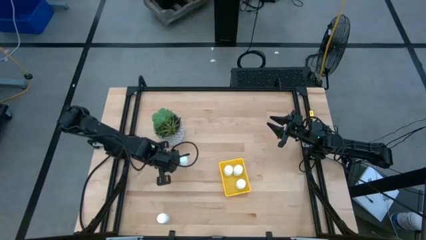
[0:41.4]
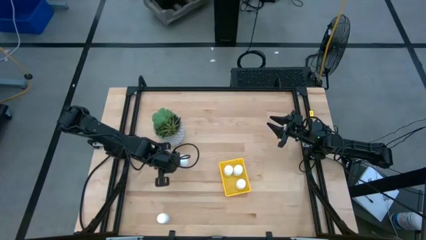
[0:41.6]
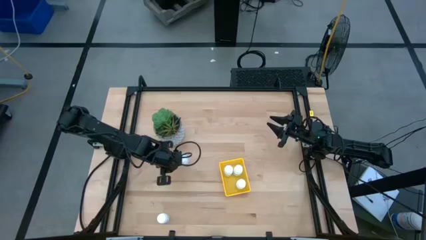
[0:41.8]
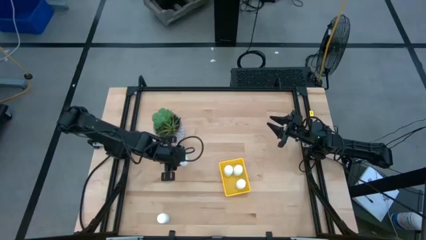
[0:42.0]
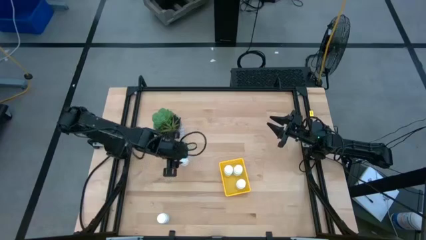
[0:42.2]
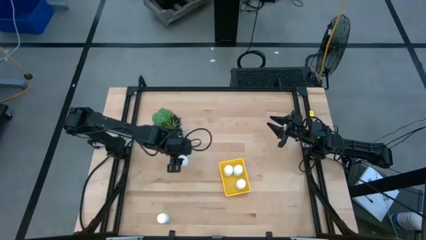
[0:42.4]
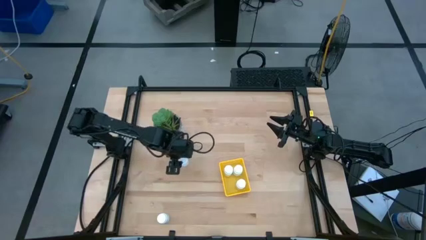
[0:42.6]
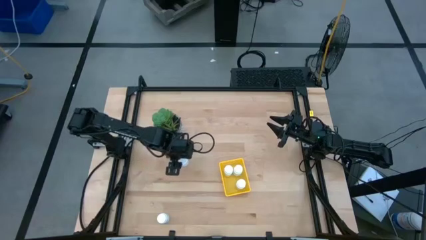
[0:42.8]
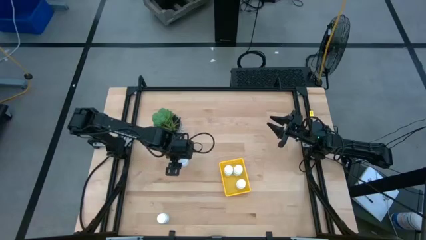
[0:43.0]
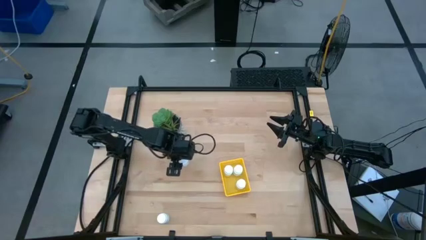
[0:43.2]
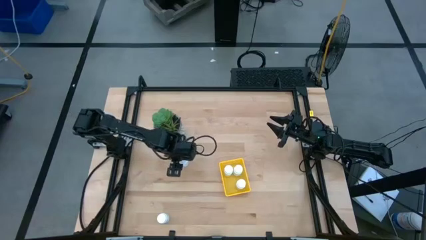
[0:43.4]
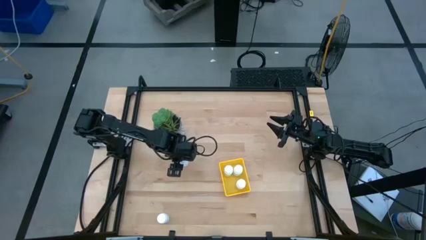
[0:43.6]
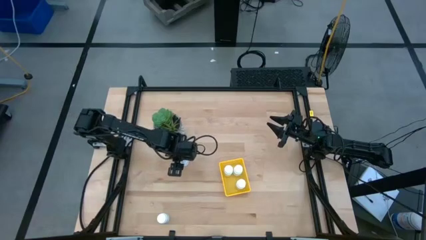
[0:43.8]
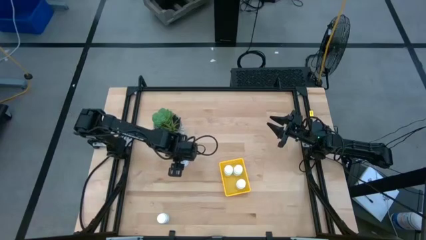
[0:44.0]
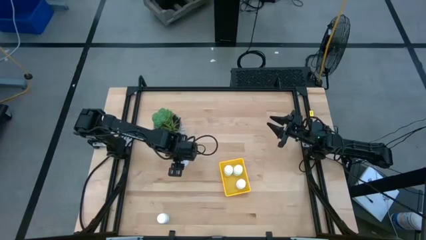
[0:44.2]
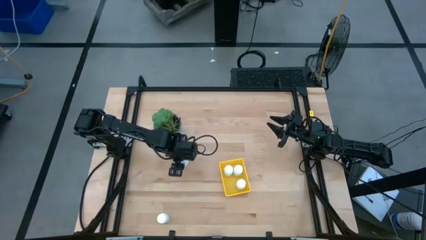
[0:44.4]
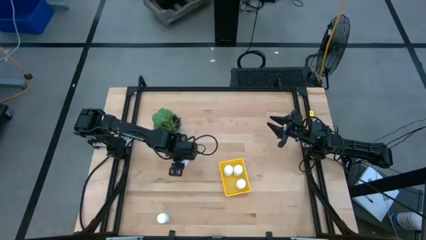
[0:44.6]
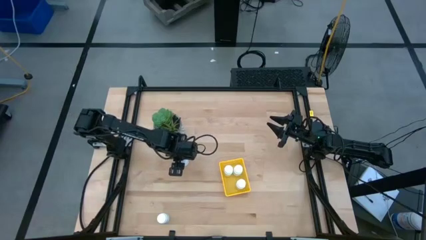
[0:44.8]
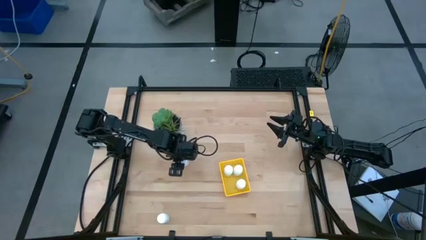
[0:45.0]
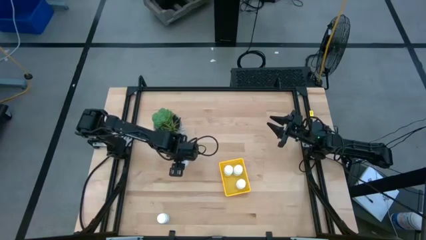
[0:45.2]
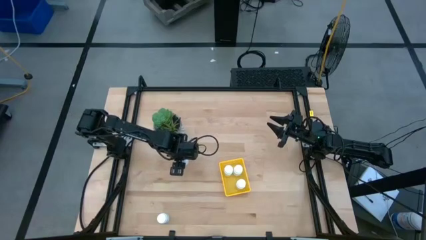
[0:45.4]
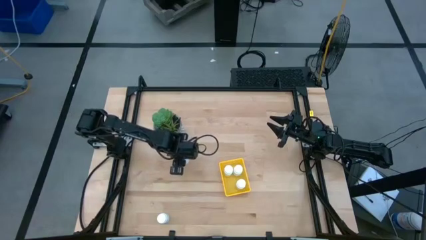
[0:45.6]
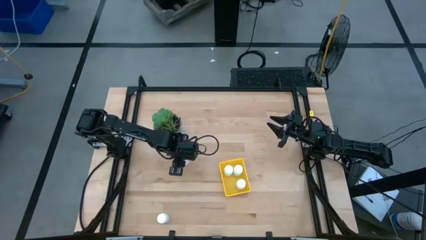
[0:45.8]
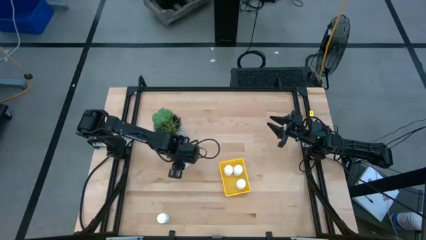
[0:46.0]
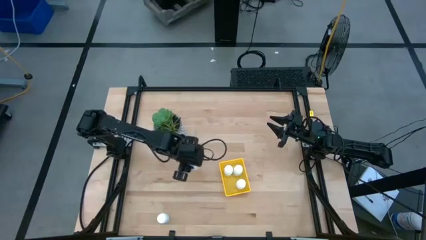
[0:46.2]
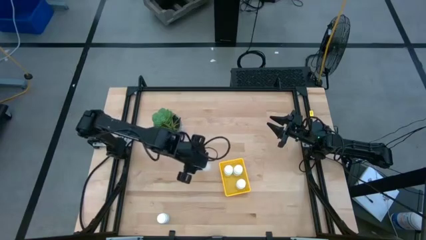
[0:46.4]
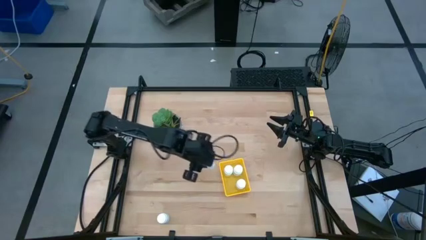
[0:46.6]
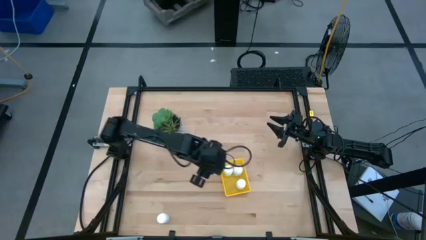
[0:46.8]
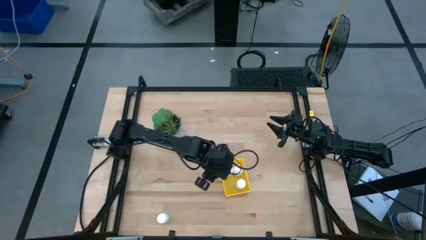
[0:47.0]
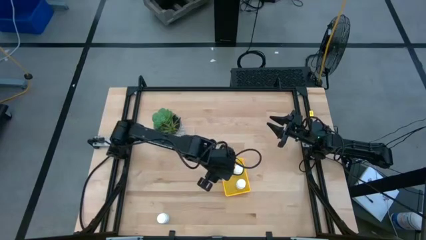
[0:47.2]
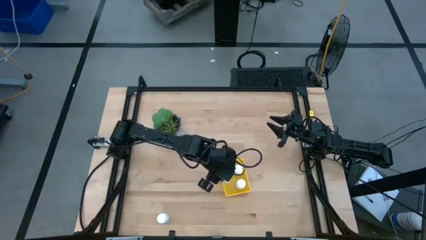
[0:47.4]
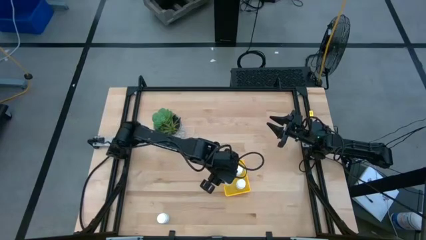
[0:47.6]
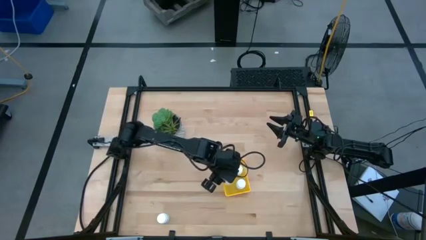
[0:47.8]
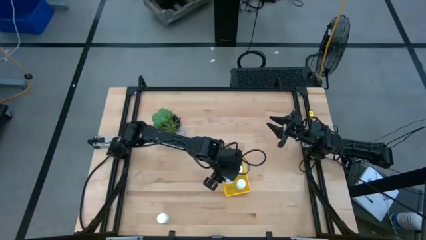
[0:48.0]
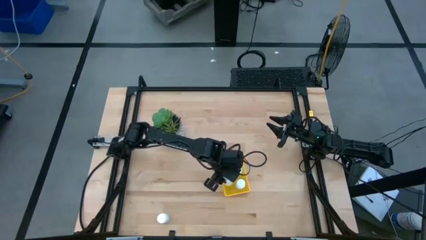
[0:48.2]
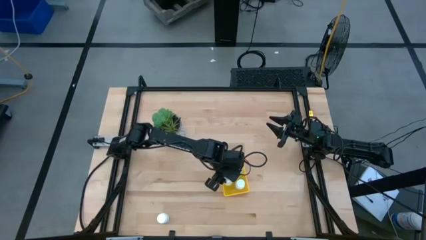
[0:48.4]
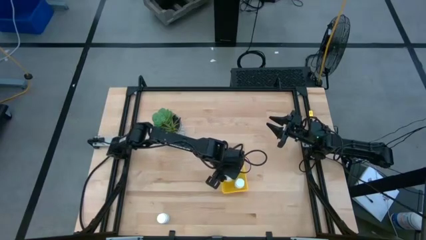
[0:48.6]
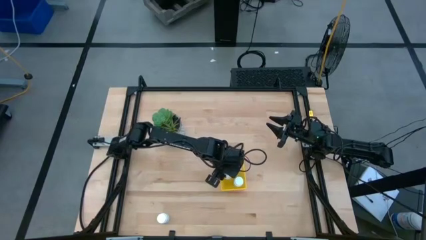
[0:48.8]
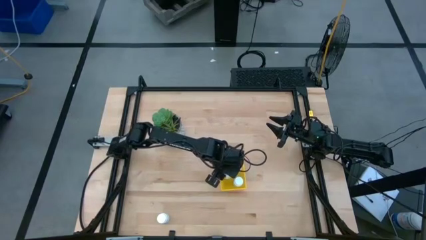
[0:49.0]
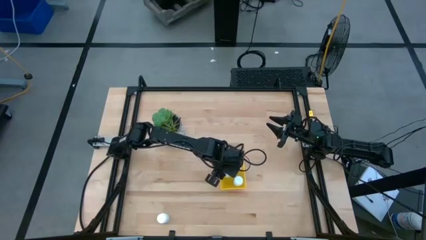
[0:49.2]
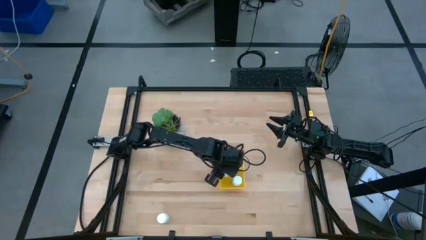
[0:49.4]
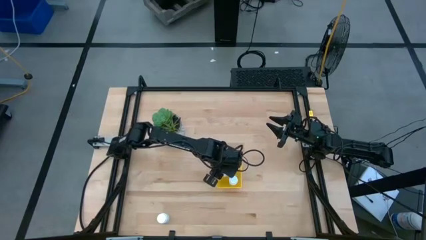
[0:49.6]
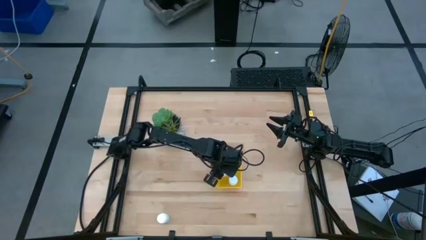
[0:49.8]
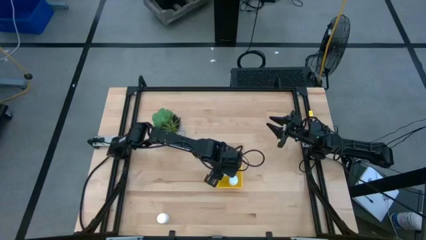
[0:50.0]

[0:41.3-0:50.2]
Task: Pick and place pill bottles into a basket
Put the top pill bottle into the basket
